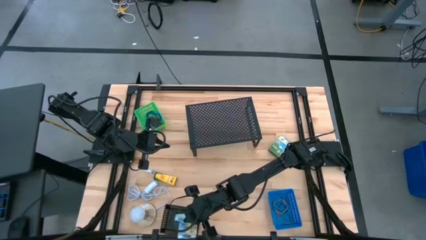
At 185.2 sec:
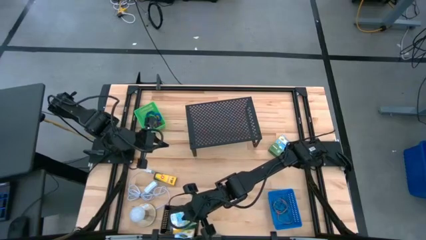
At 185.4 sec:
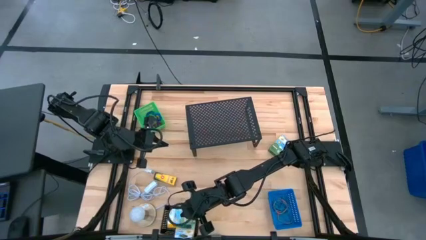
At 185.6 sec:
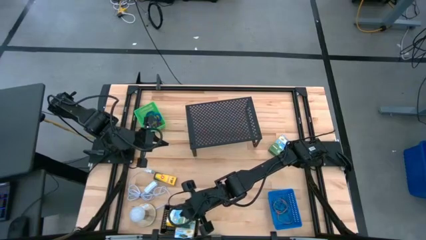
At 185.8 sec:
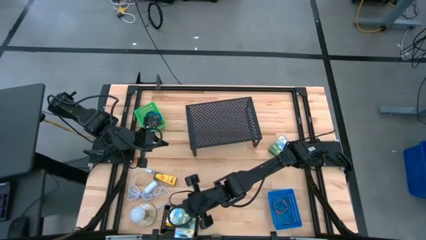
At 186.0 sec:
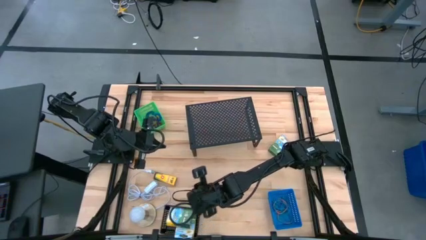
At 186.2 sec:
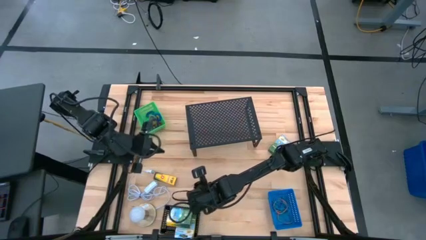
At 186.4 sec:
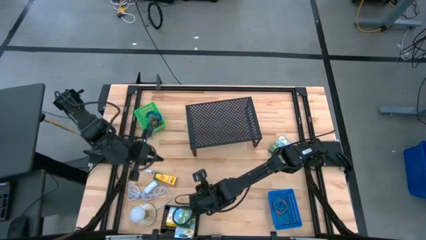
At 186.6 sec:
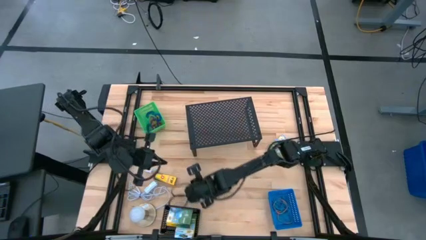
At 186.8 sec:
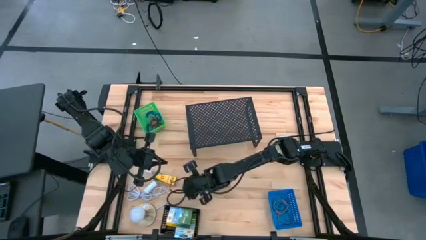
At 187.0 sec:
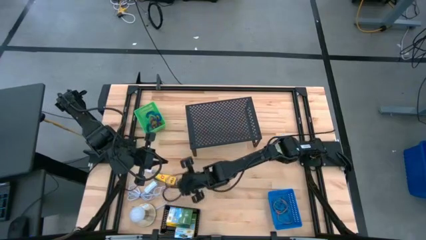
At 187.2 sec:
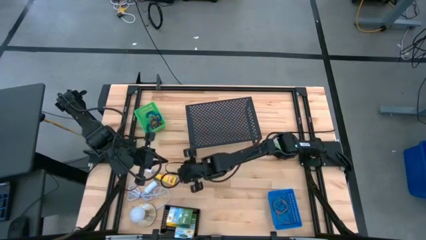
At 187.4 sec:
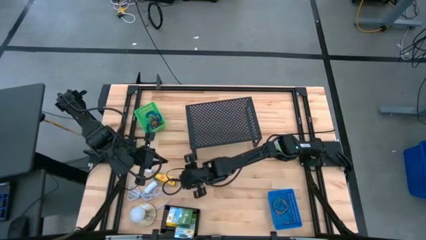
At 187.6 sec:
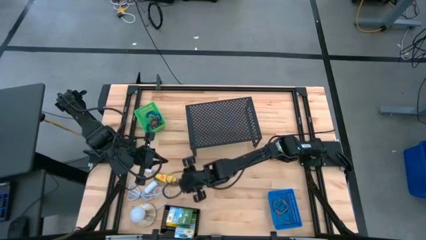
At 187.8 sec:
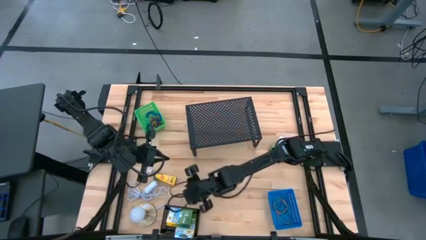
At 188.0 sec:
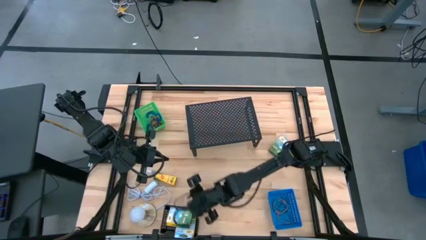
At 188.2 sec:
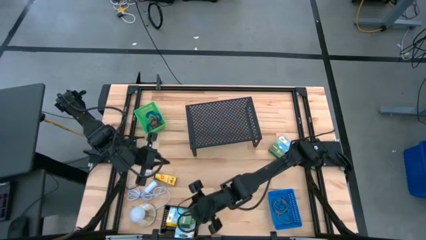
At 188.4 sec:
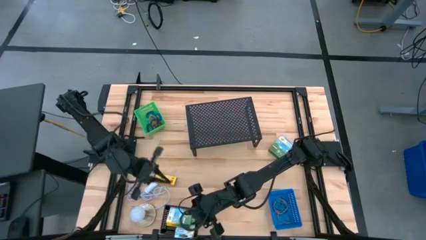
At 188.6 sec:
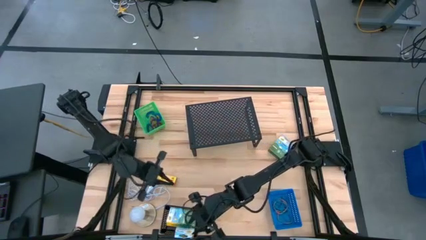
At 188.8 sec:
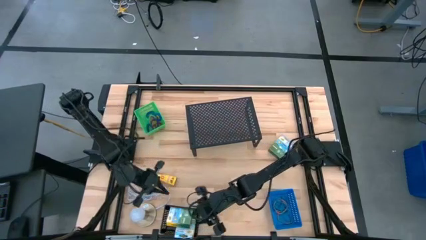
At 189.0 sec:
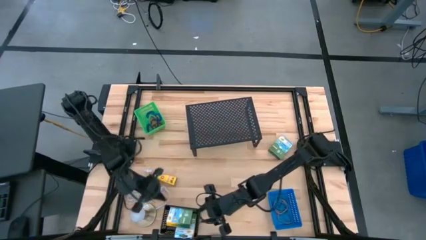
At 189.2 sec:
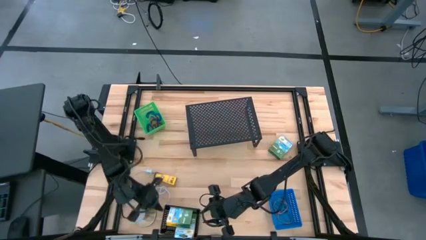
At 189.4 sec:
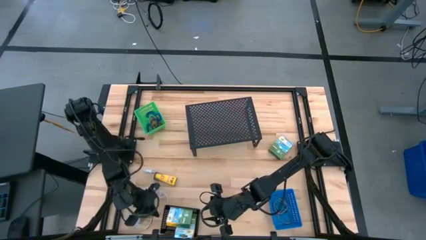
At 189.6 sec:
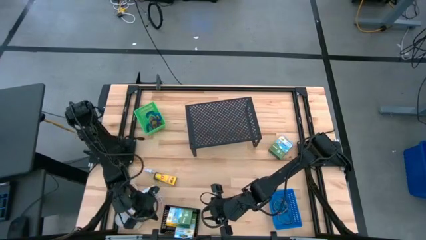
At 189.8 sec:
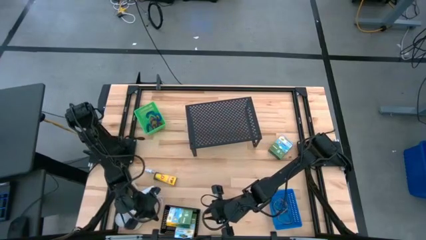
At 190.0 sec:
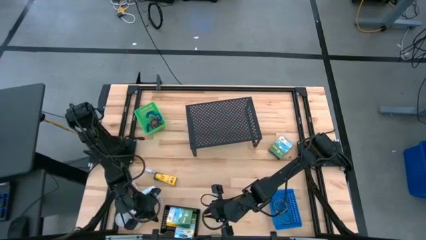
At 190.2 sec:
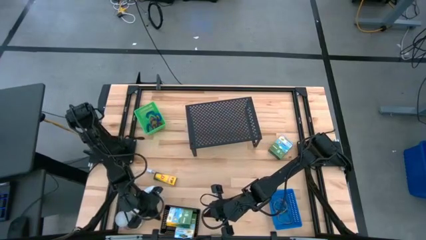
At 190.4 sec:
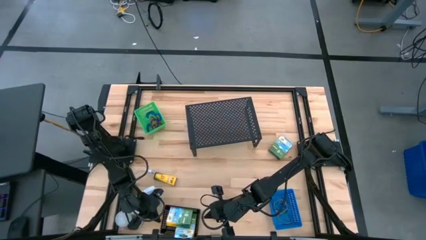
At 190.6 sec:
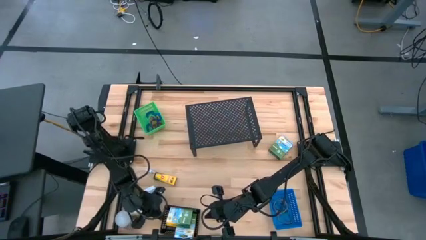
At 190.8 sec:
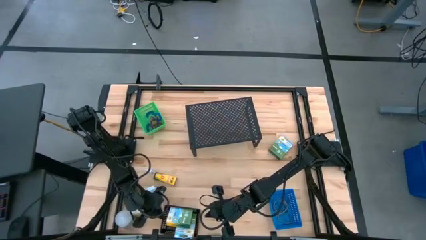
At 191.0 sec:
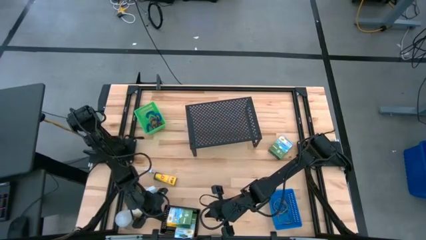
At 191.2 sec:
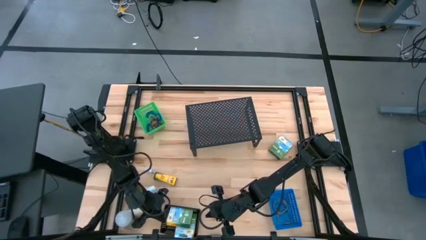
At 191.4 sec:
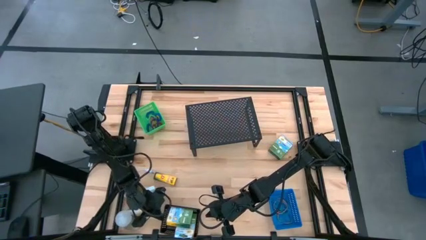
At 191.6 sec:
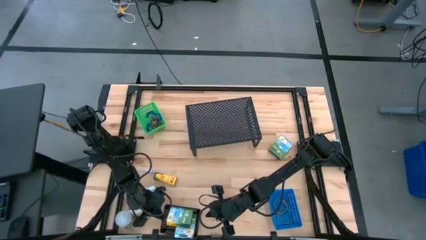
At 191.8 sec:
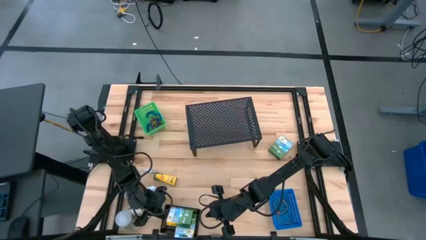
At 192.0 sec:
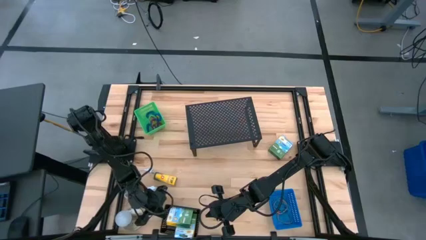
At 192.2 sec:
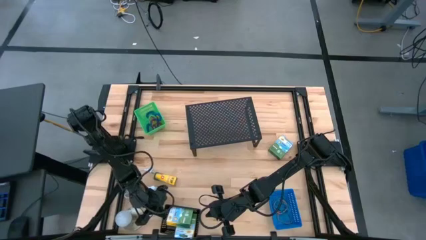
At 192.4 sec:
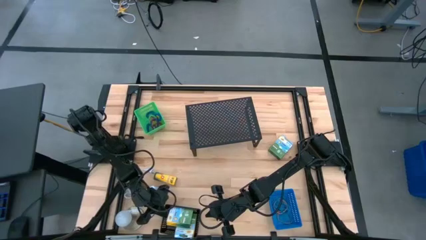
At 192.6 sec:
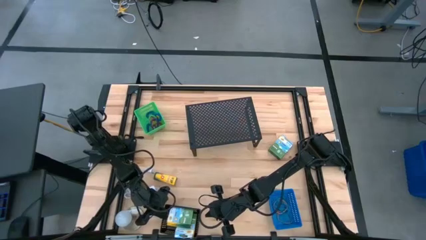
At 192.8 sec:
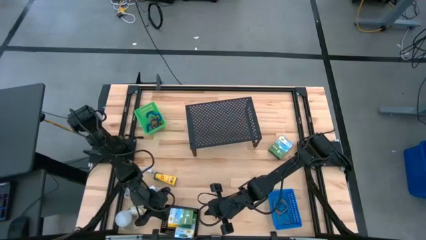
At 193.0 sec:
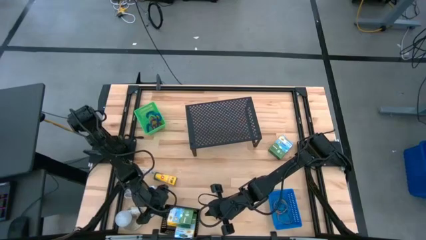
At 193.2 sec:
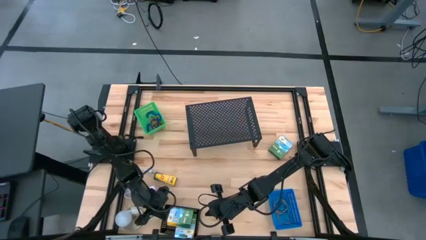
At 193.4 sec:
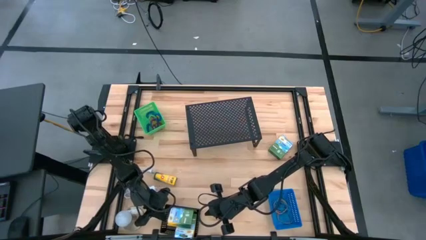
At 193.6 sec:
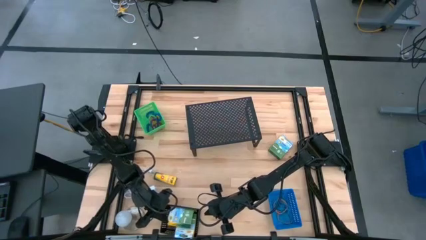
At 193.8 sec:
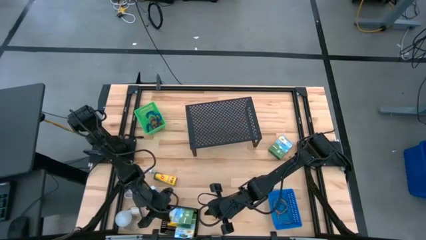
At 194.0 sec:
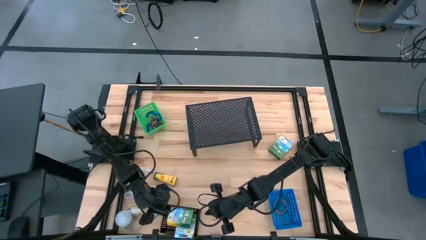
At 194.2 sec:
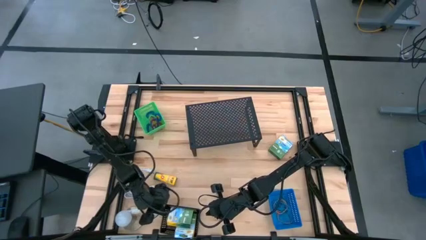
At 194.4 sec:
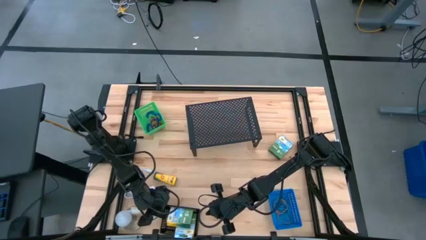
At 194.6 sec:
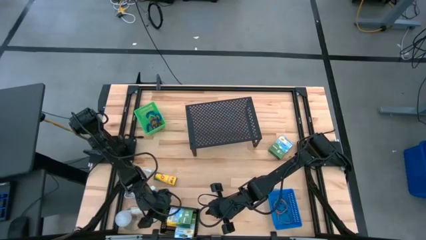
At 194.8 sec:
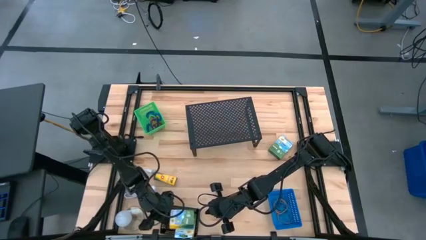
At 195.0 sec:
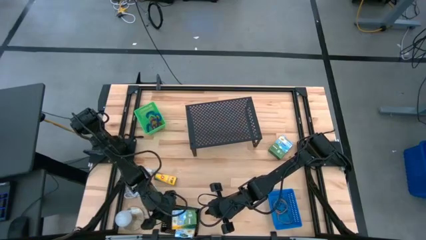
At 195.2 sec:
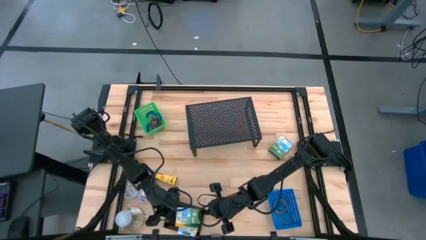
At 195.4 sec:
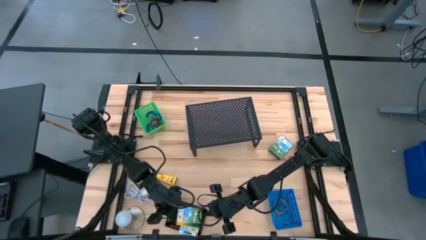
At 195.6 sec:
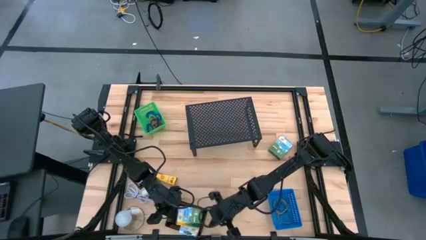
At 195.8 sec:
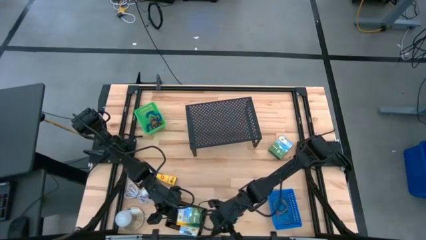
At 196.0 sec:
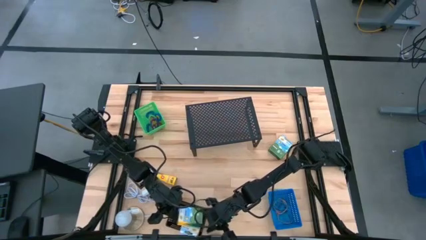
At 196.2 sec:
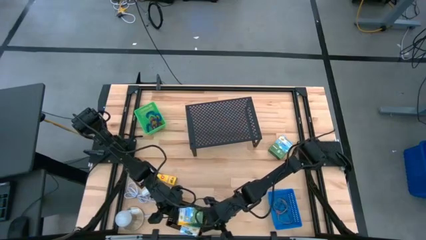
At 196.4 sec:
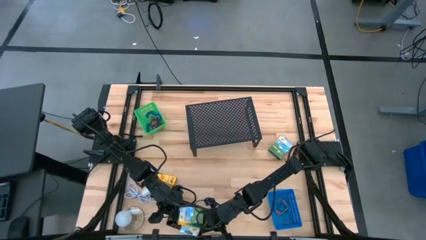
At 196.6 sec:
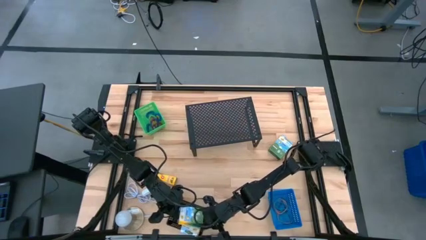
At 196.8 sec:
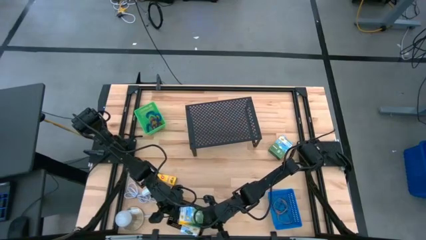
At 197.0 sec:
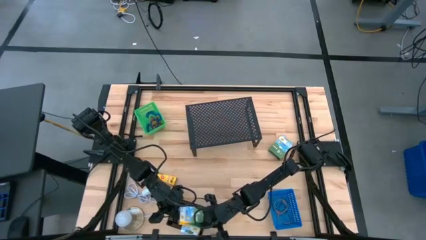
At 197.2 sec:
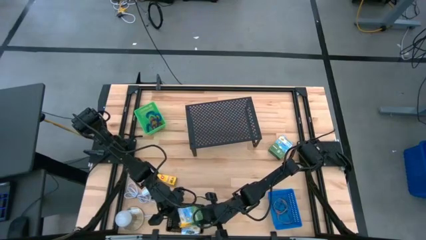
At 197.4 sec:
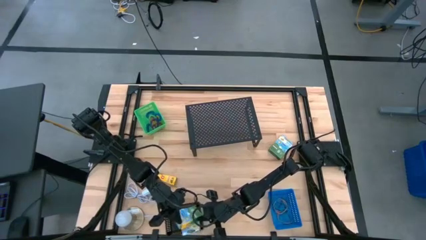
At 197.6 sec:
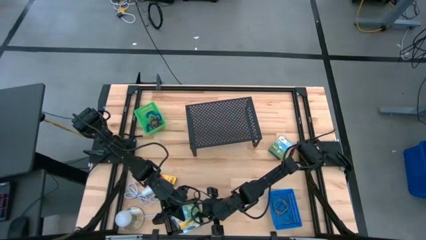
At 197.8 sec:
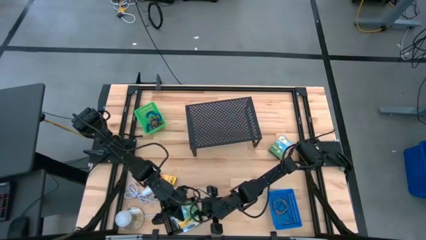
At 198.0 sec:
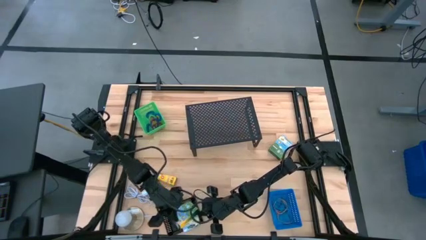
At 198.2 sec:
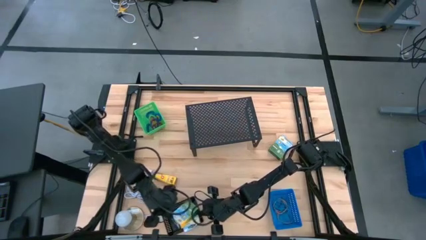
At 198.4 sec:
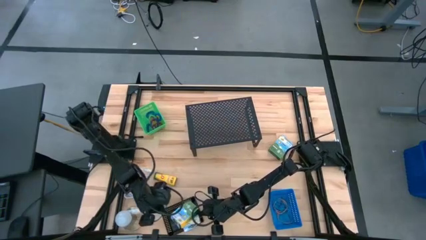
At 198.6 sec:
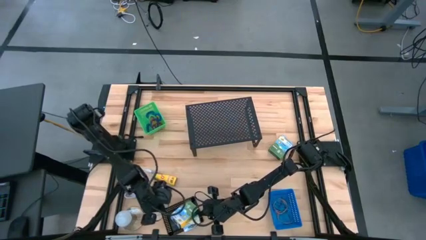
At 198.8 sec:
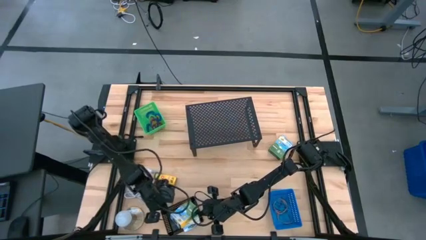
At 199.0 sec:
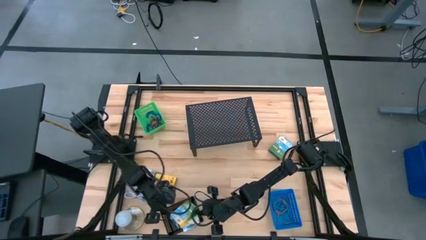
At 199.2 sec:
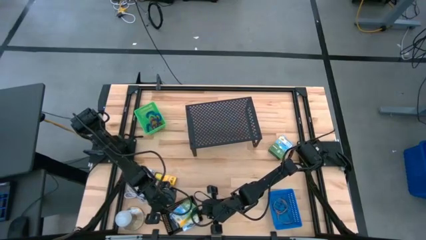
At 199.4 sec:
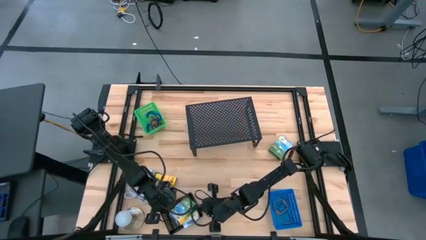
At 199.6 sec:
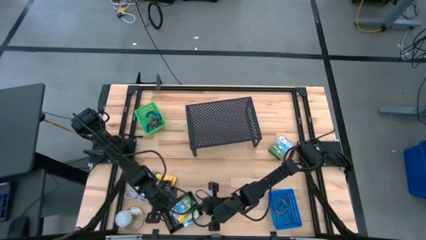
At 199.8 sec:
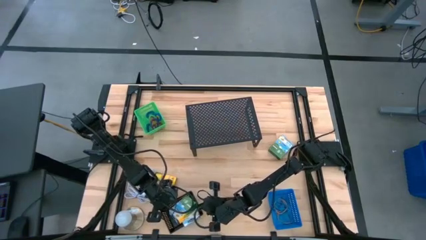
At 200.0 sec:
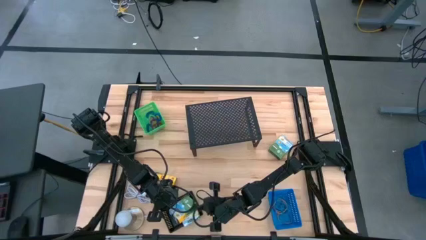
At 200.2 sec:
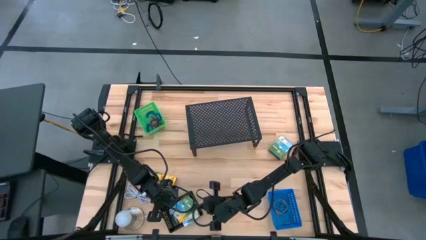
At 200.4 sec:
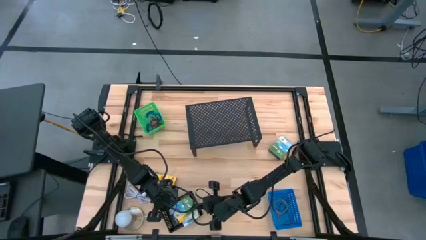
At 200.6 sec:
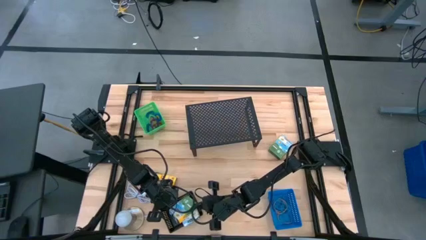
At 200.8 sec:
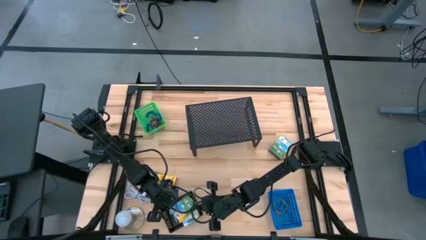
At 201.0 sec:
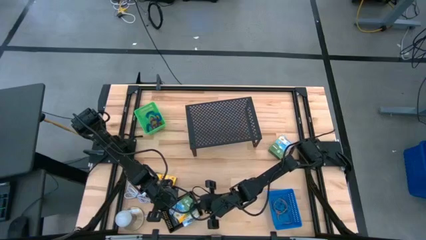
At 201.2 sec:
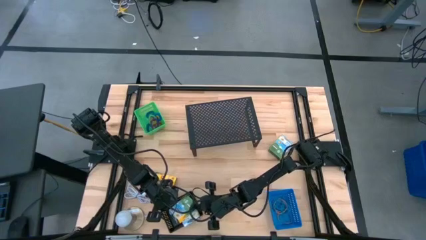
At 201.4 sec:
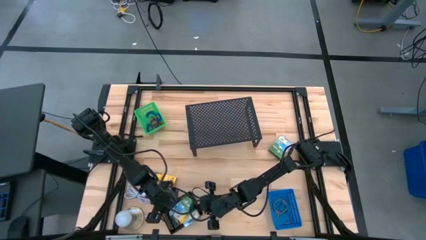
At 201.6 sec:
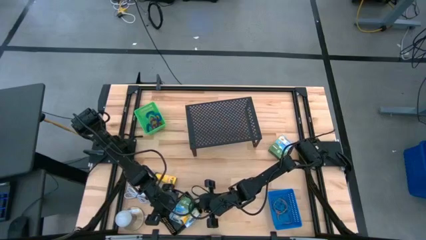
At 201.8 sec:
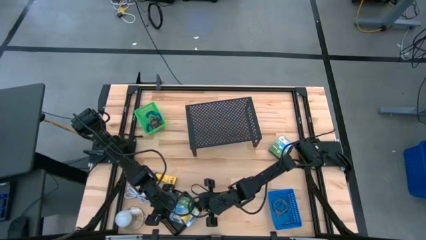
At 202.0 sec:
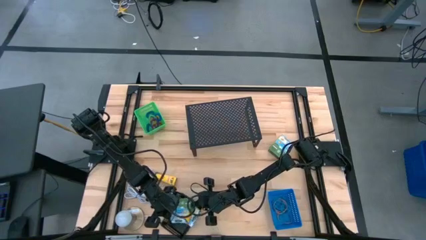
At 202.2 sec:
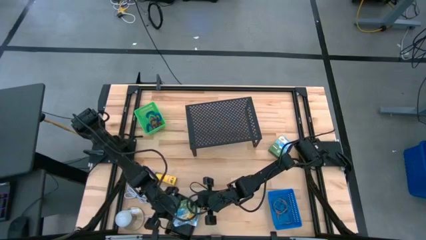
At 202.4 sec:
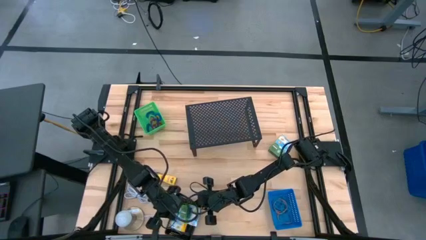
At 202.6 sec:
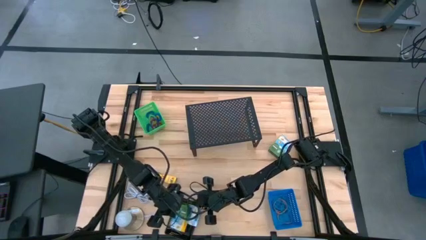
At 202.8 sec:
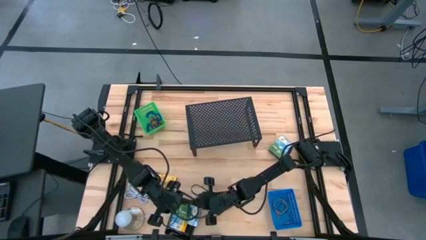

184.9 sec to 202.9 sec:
Task: Pick & Place Office Desk Supplies
Adjust the yellow crayon box in the black bin
